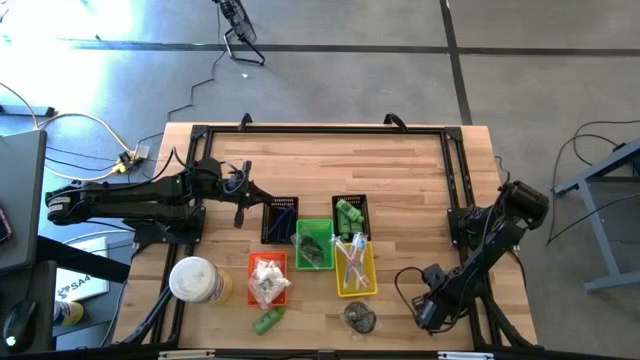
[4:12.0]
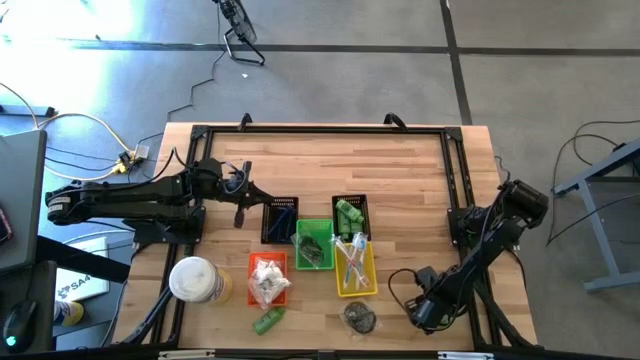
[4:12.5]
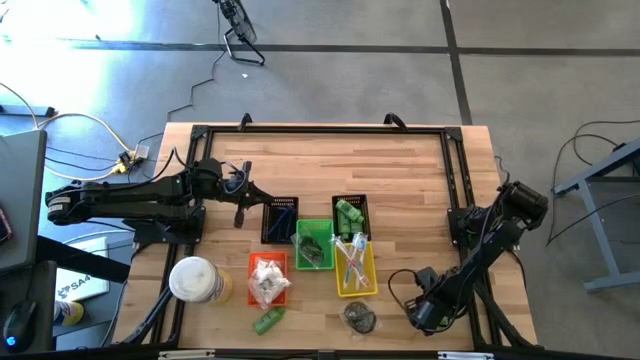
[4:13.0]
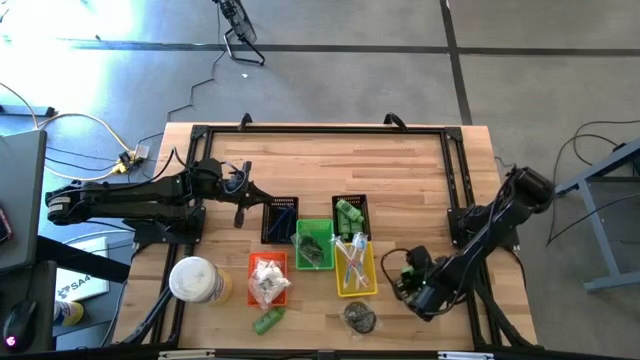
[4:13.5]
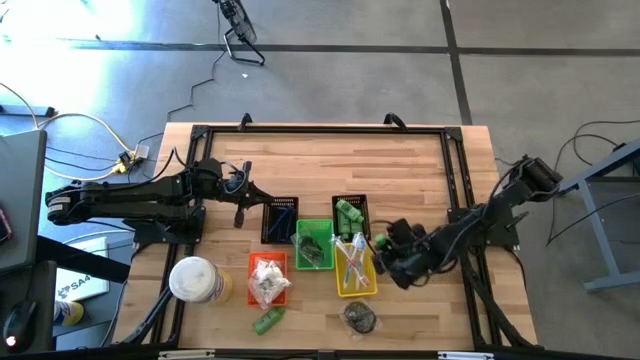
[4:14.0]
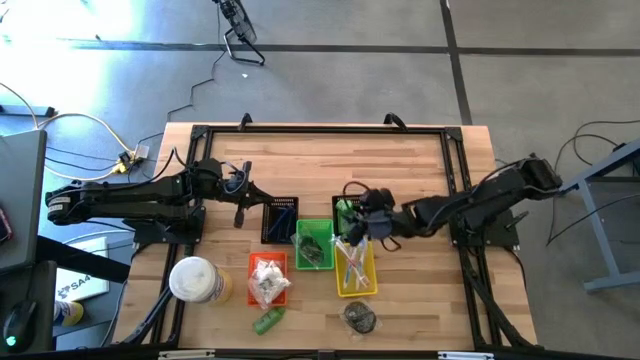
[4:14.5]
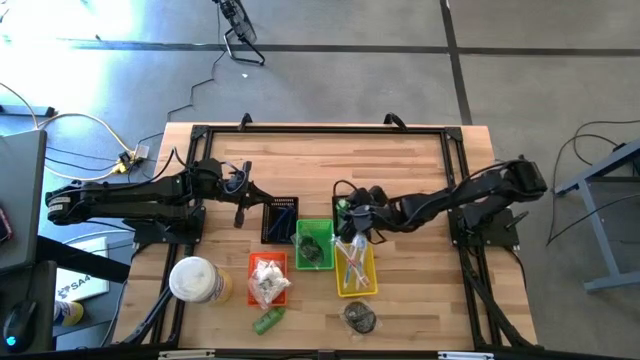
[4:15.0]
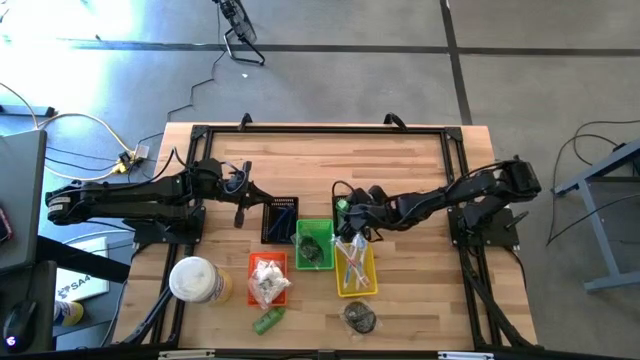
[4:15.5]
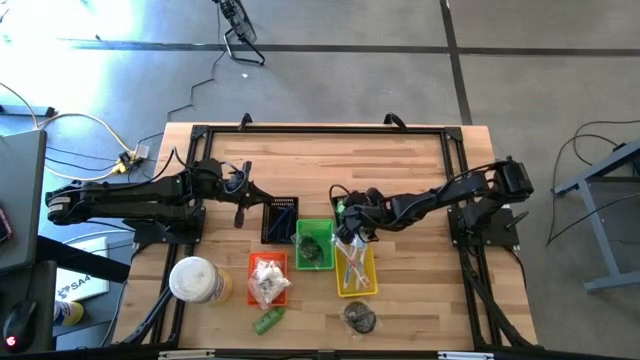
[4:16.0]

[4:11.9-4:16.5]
Task: Pick & Place Travel size toiletries
Put the green shampoo into the right black bin

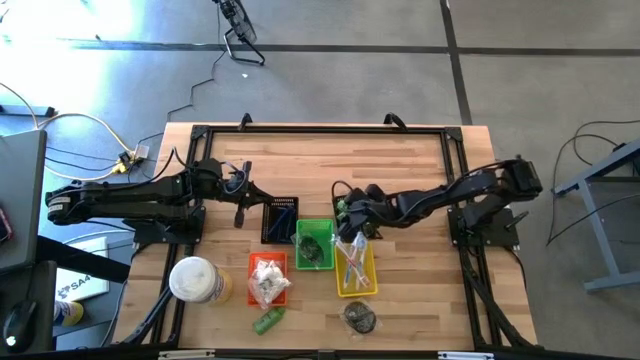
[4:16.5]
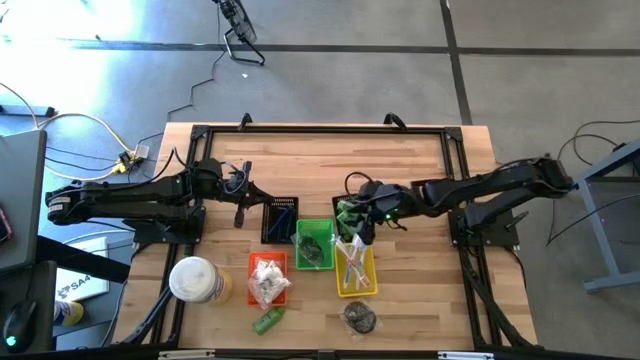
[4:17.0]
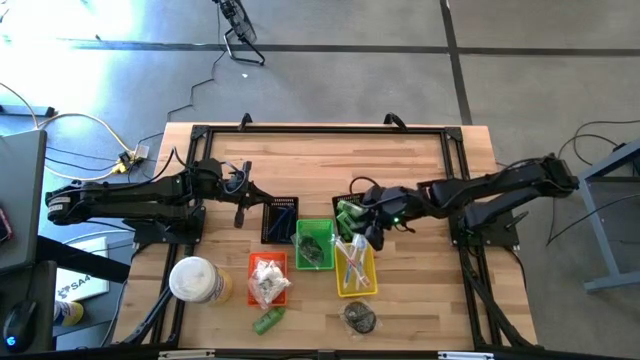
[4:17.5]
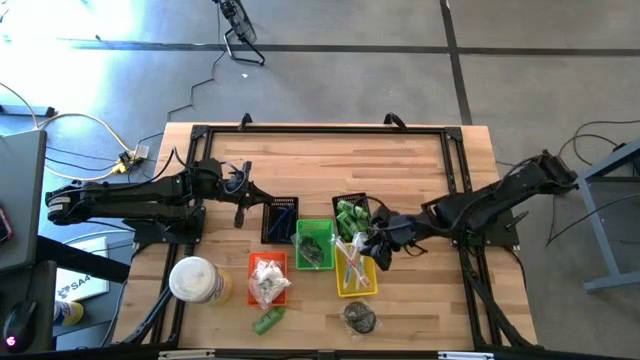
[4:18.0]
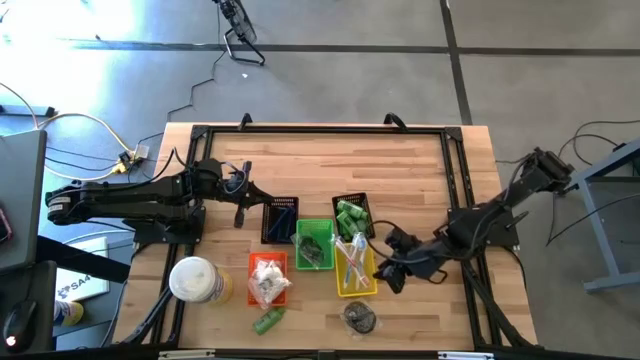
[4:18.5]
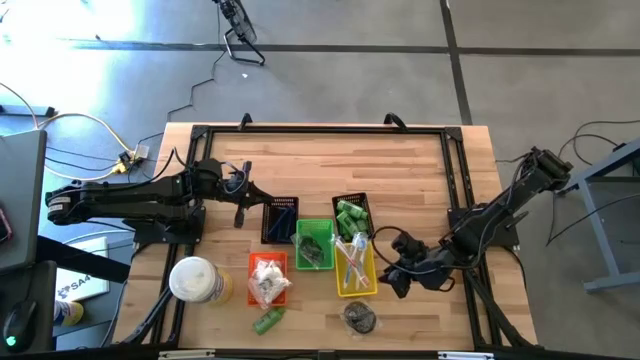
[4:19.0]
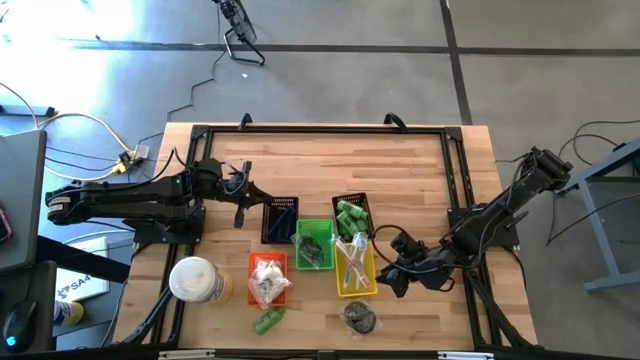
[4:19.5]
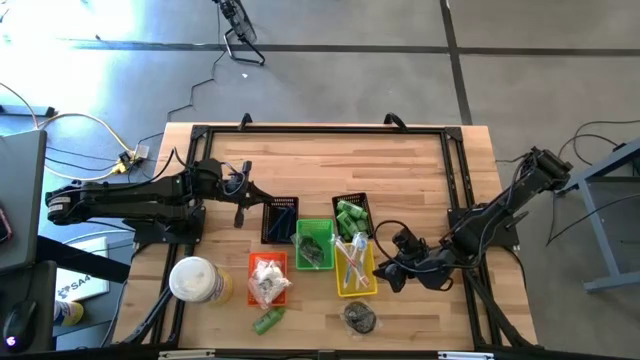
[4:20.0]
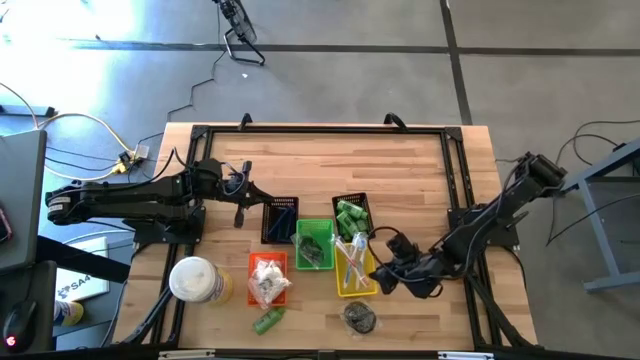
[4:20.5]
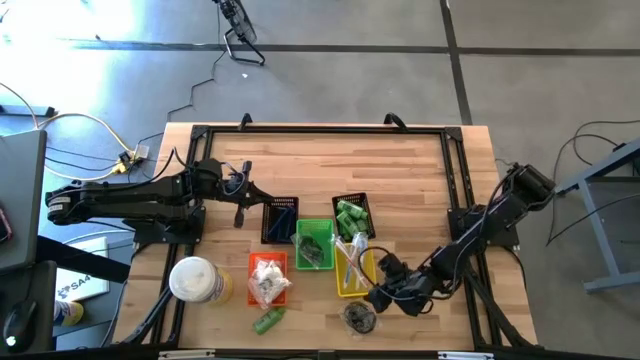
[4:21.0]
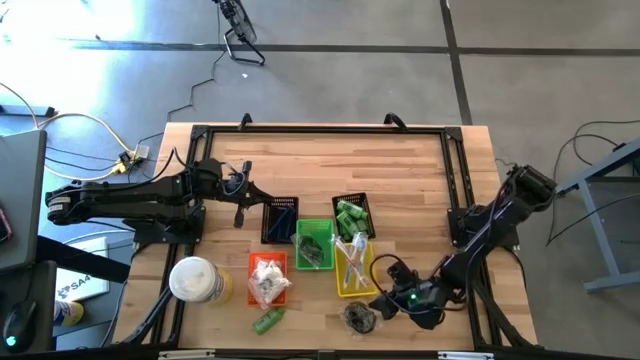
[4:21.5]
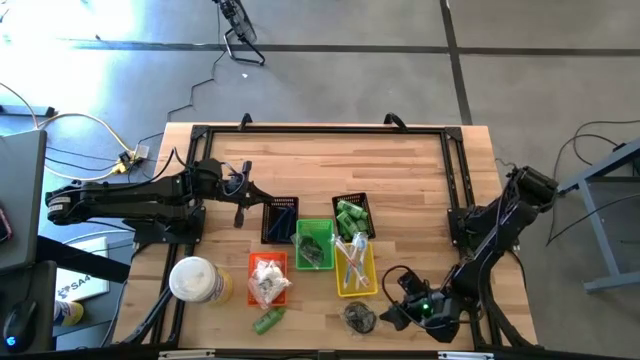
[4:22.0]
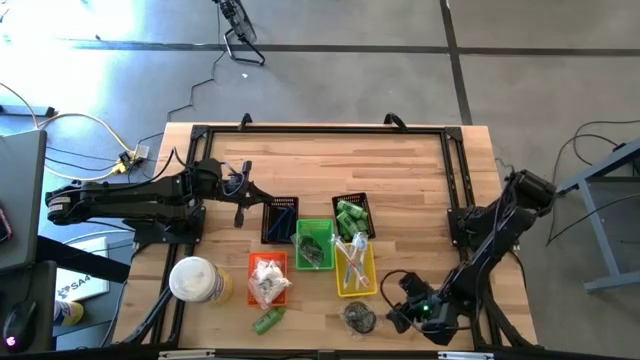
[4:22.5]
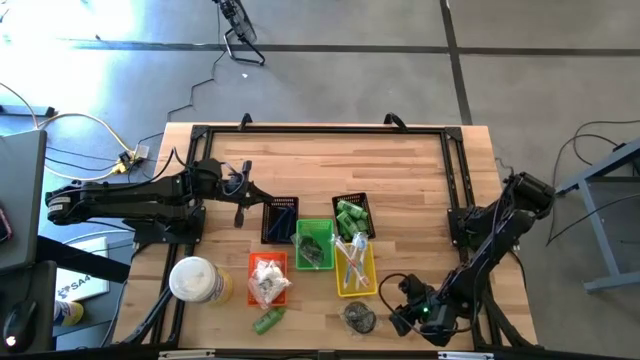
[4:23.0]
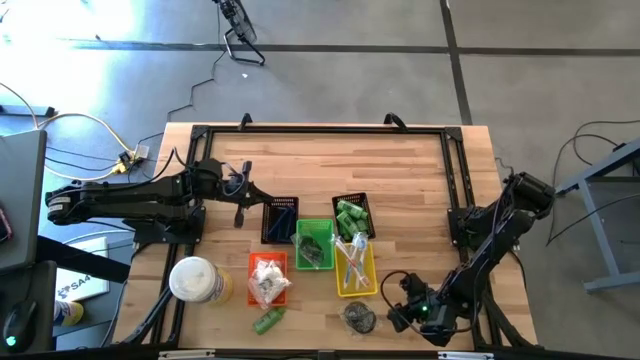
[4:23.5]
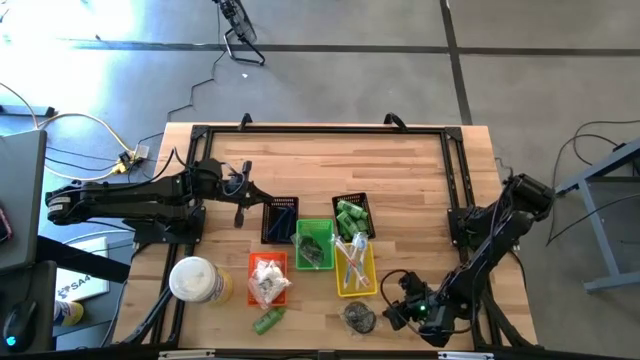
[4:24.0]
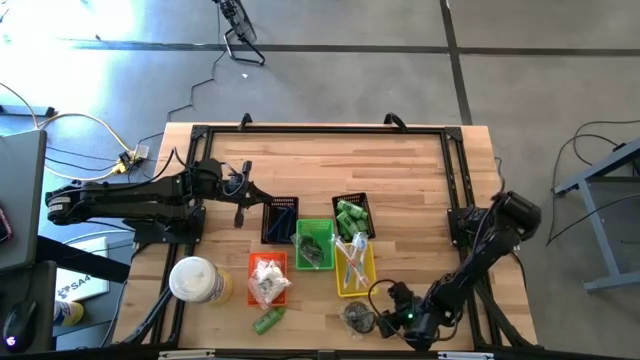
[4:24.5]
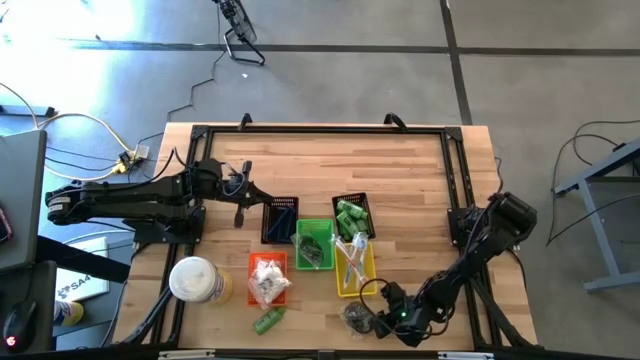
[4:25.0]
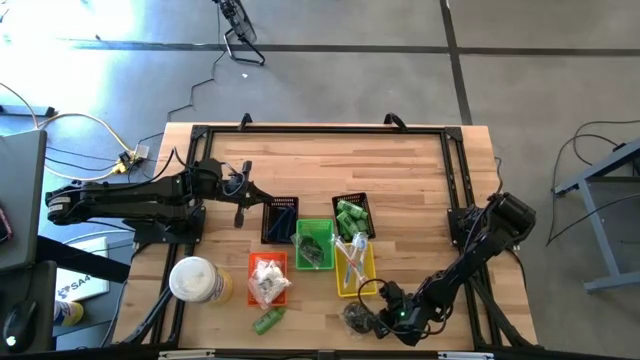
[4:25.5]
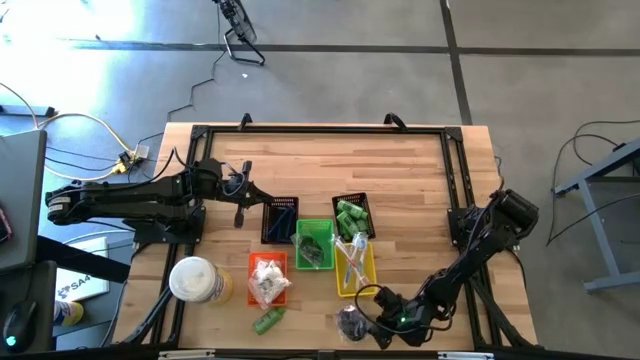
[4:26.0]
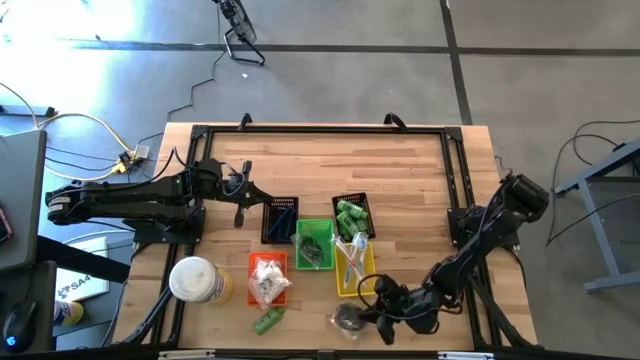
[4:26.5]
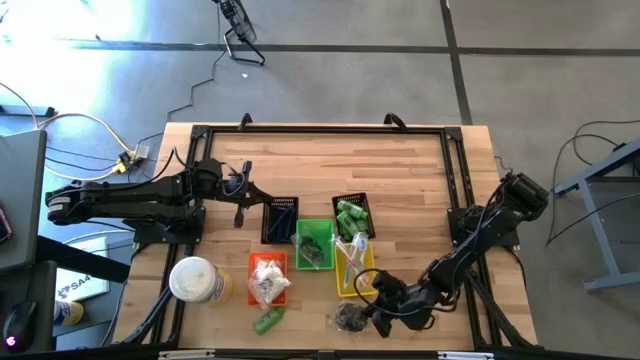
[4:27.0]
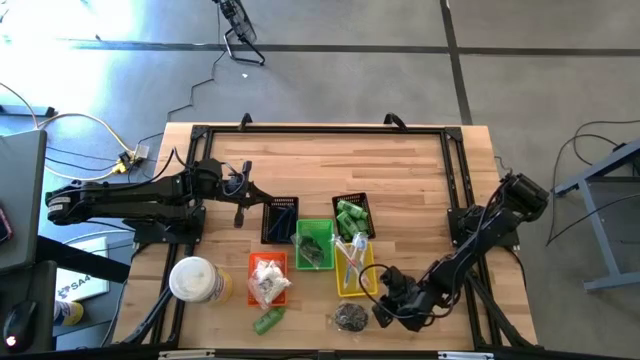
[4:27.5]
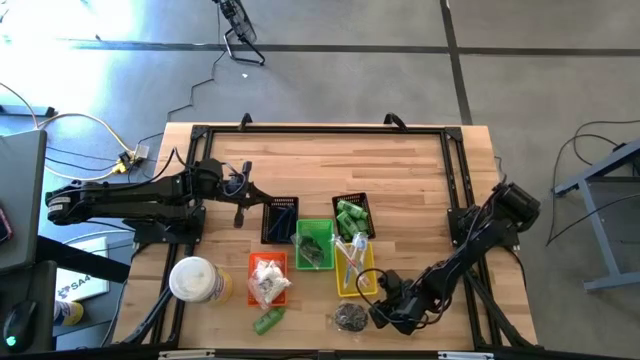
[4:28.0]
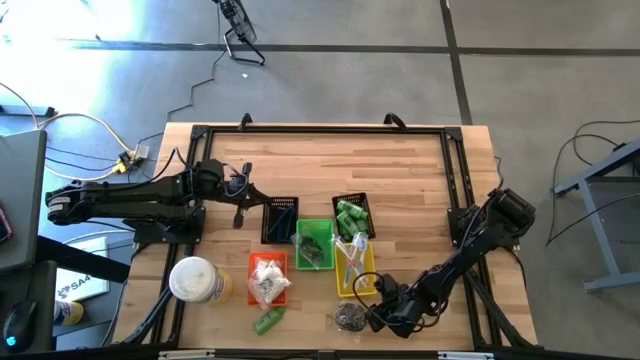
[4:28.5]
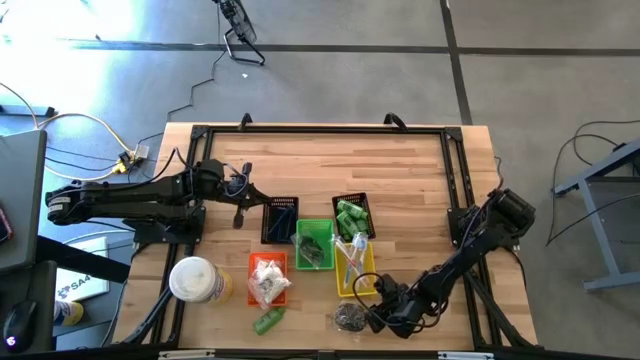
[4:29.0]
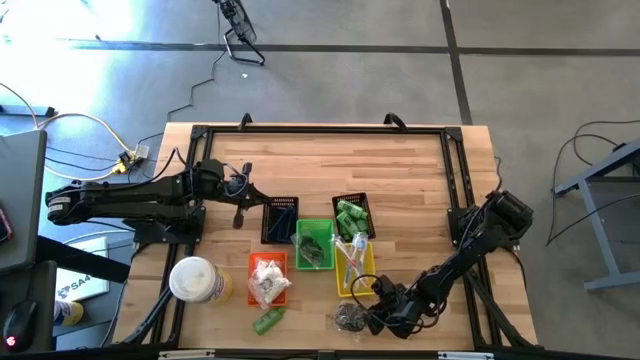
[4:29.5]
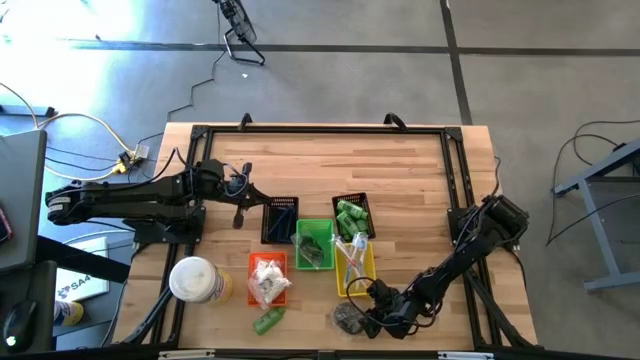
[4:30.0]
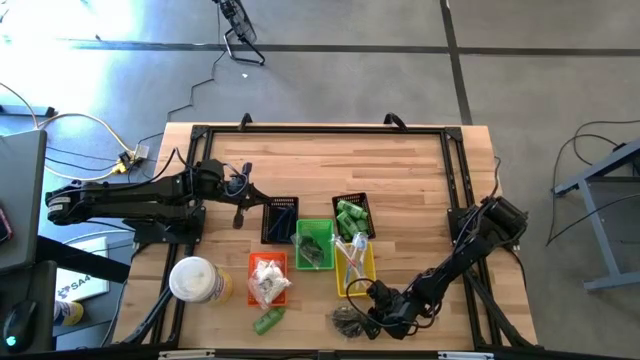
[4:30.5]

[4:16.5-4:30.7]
Put the black hairbrush into the green bin
